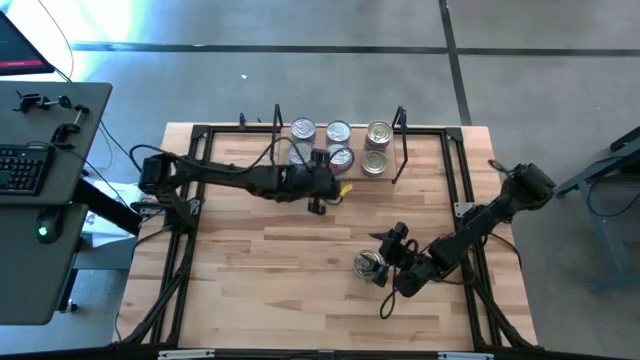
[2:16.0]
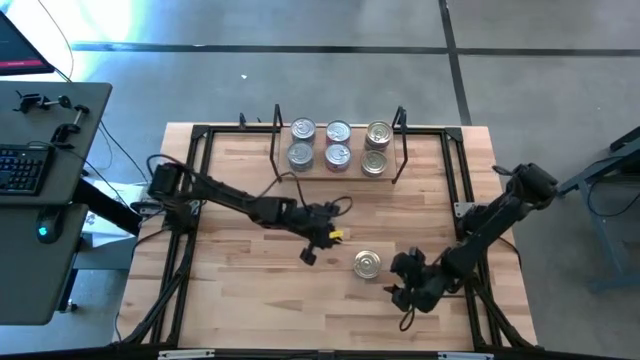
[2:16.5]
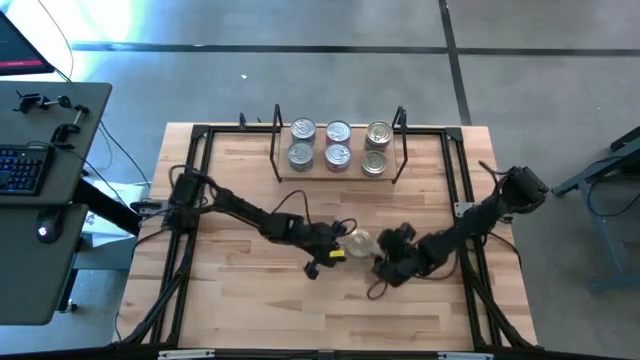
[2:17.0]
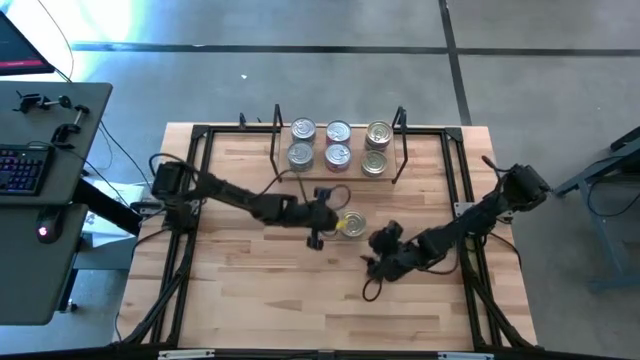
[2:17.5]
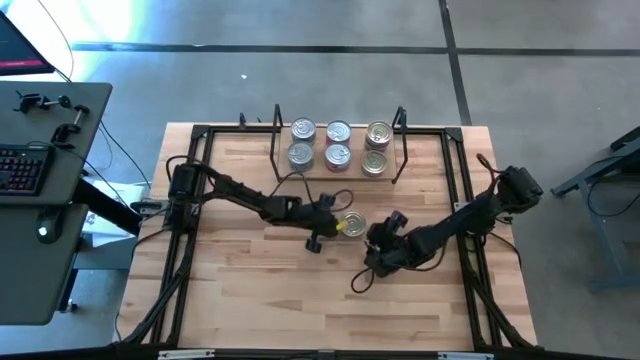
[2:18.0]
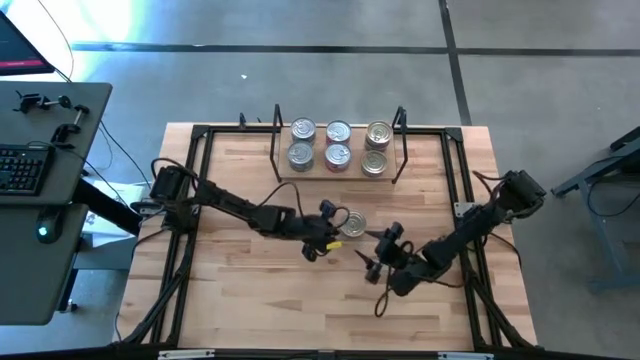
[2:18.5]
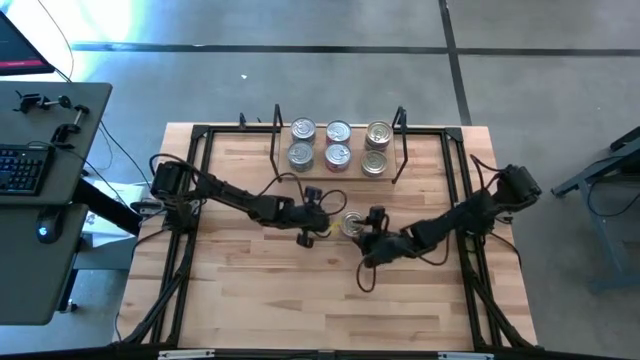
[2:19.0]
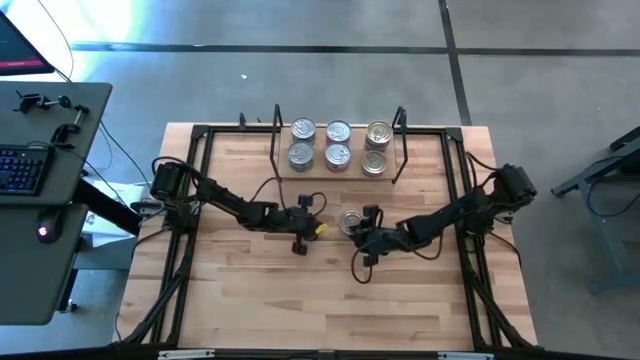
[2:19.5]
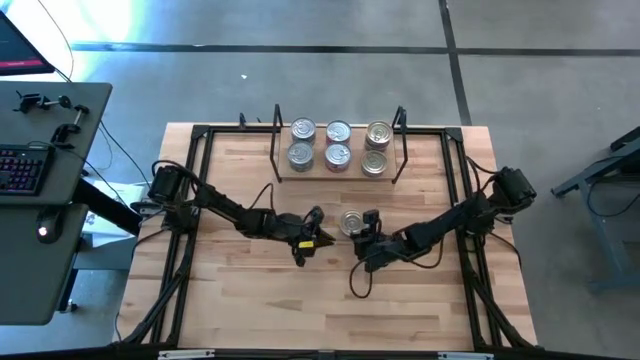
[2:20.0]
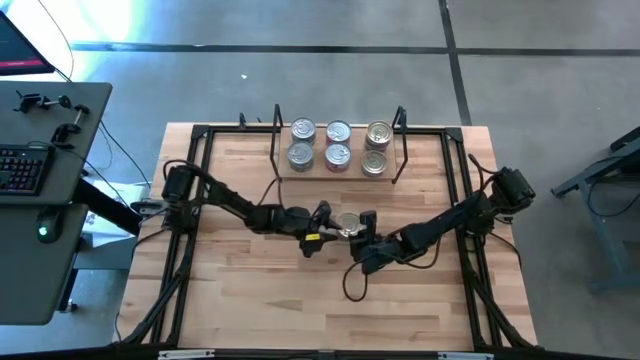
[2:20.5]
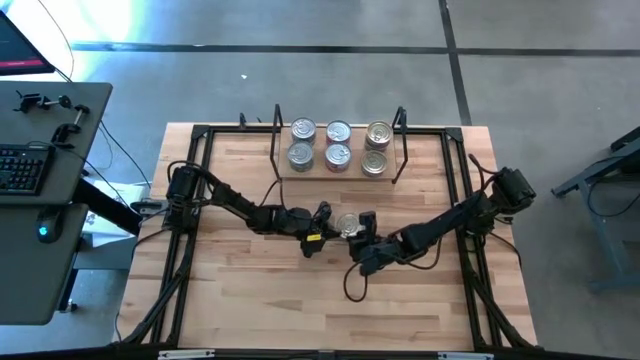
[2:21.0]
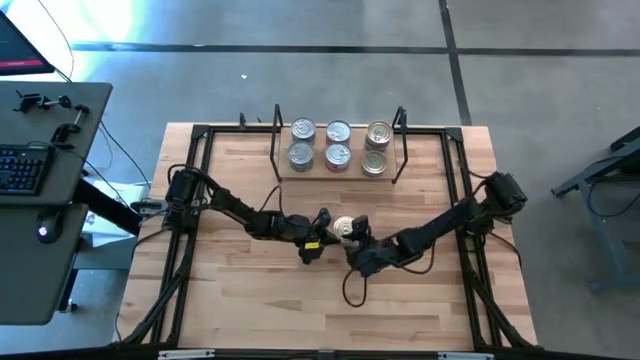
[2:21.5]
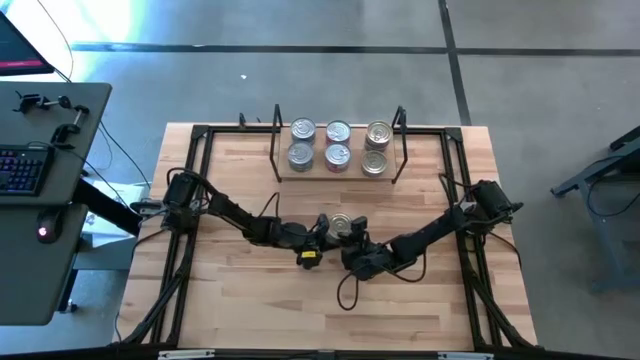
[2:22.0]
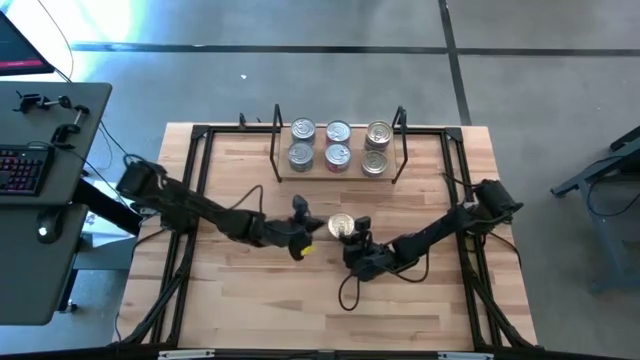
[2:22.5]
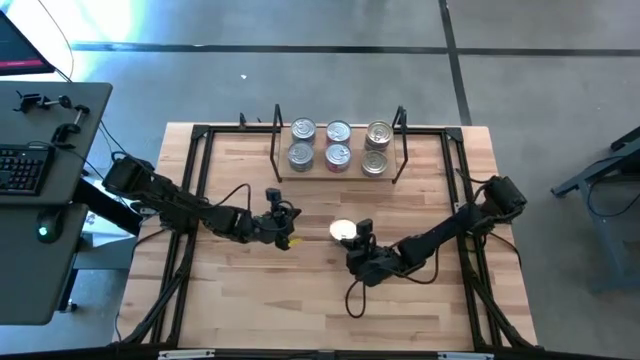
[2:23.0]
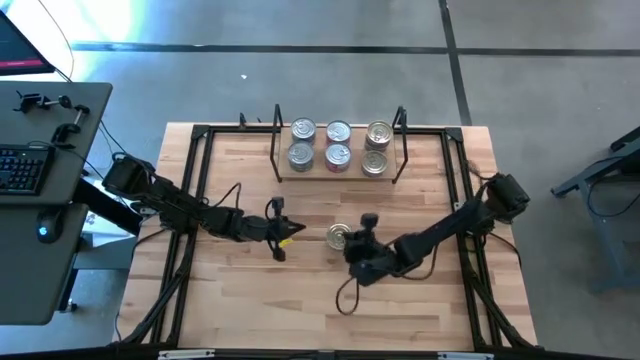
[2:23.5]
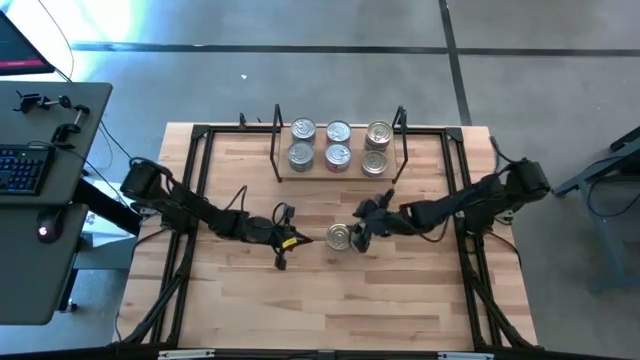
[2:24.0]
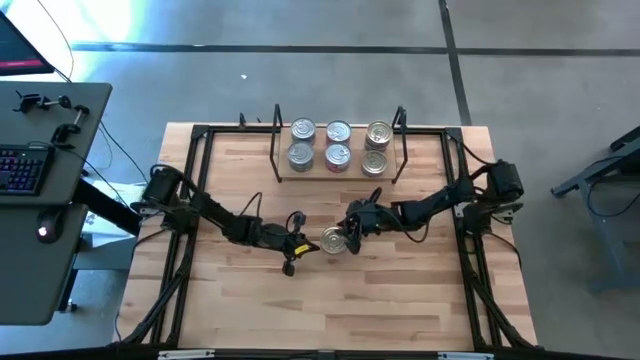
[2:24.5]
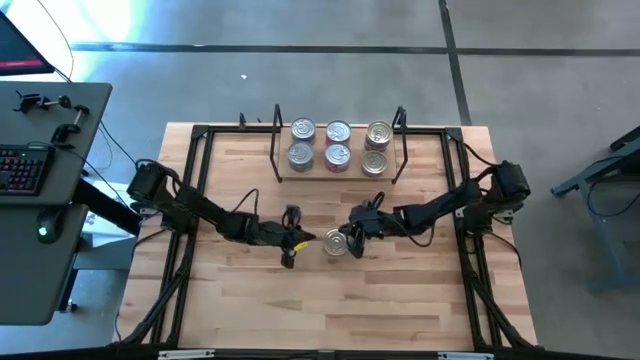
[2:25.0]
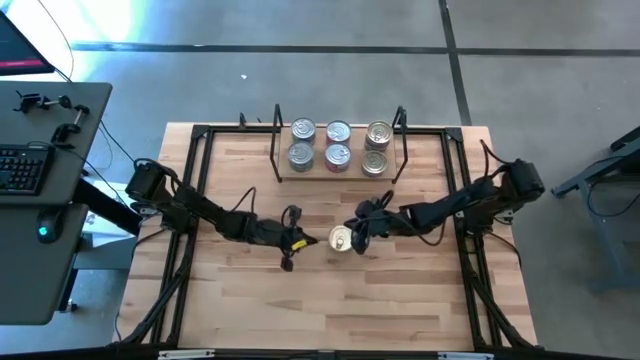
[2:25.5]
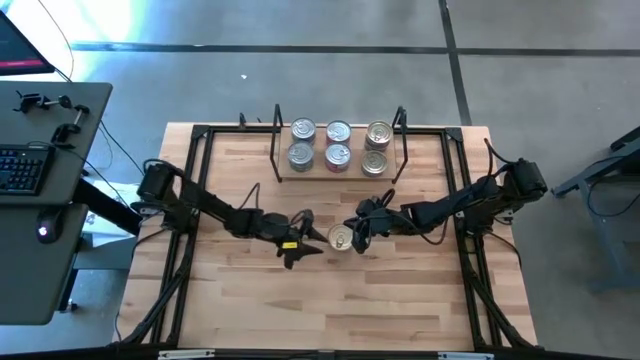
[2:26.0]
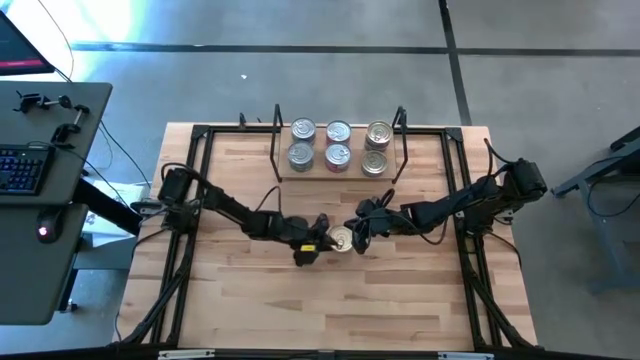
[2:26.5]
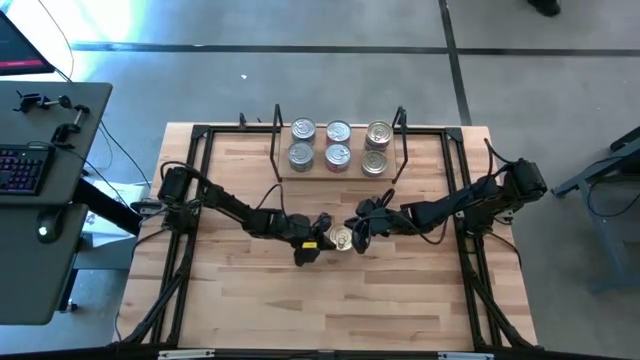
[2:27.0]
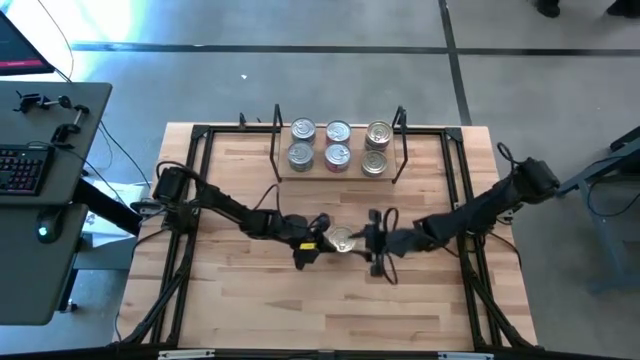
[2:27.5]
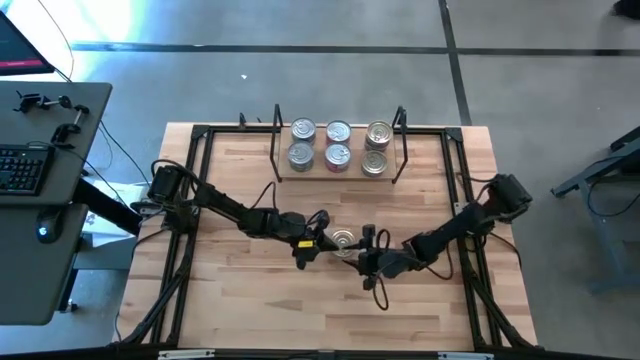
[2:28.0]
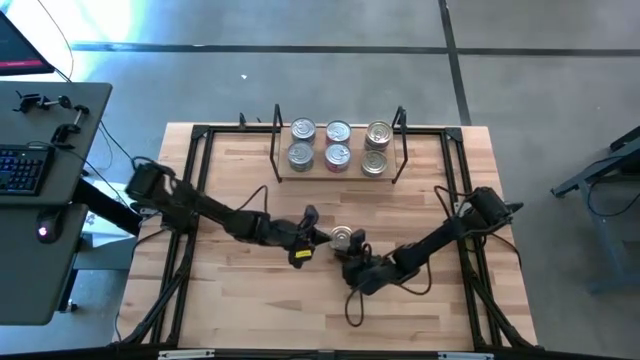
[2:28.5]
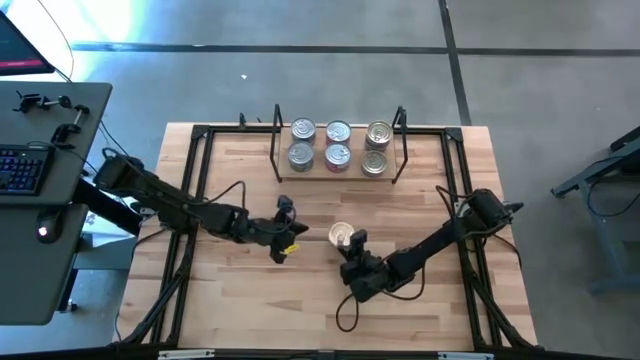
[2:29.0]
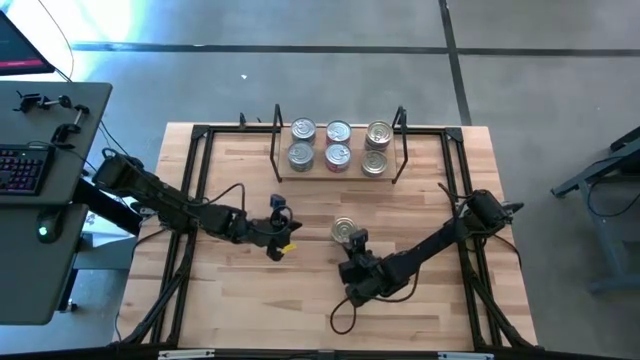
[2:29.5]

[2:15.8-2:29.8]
Task: Stack canned seafood by type on shelf
Stack the blue-pink tuna can on top of the blue tuna can on the shelf

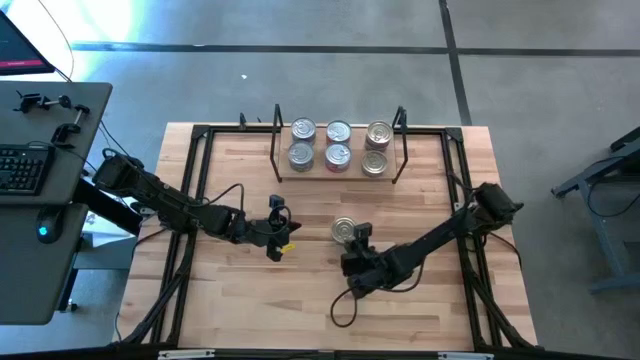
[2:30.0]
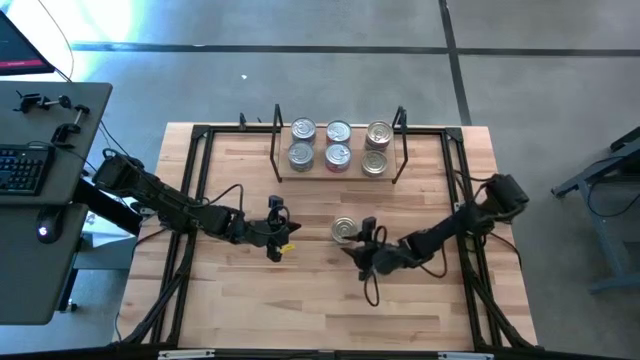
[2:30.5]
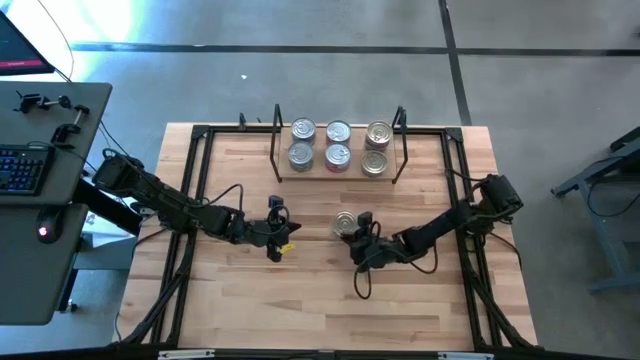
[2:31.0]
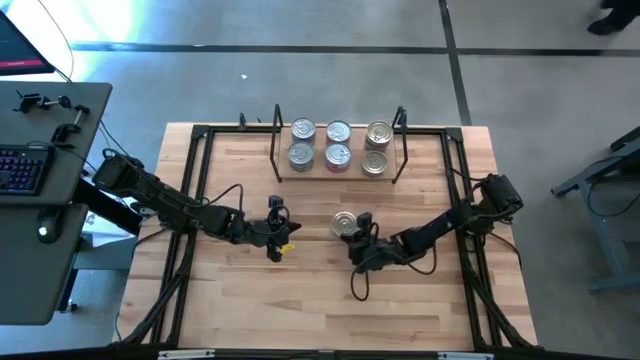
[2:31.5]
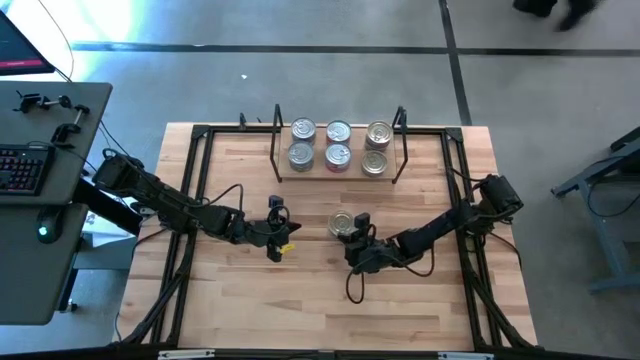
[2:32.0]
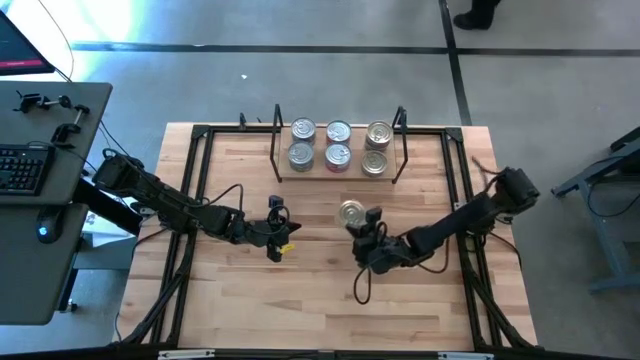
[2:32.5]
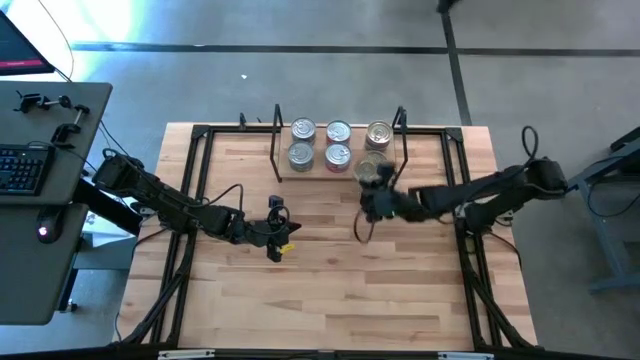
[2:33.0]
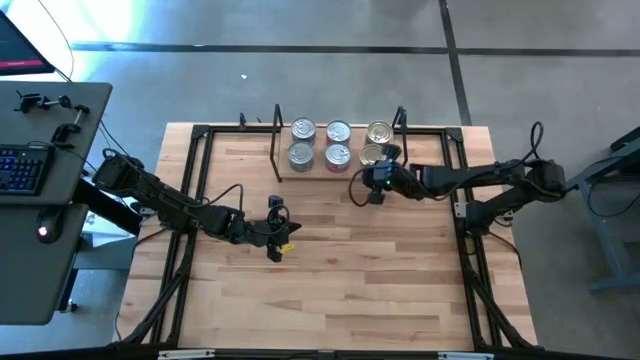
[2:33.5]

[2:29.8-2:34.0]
Stack the blue-pink tuna can on top of the other blue tuna can on the shelf
